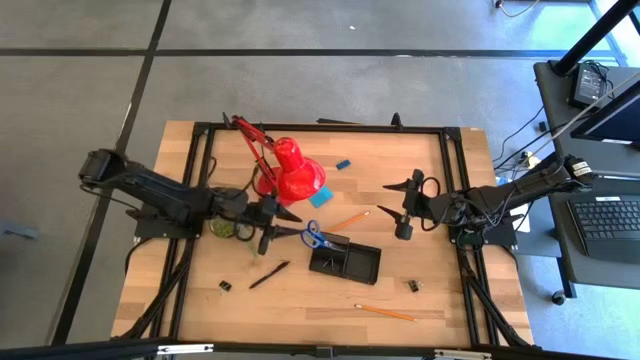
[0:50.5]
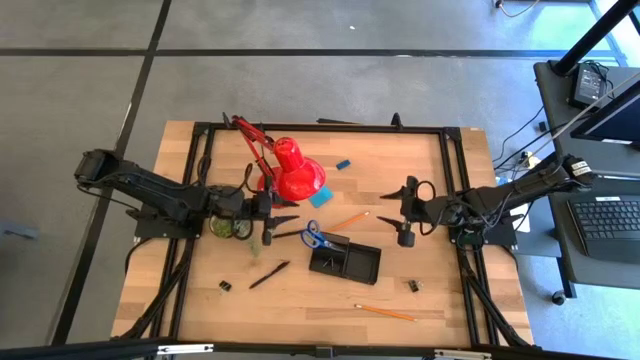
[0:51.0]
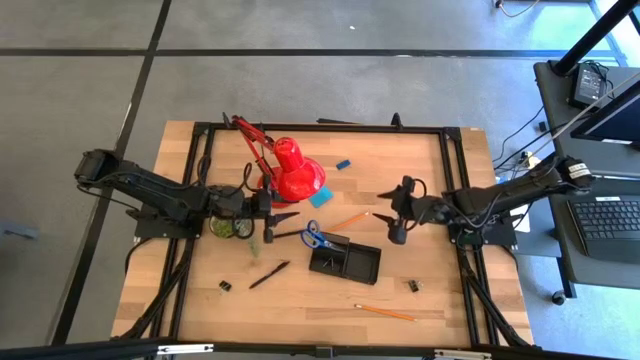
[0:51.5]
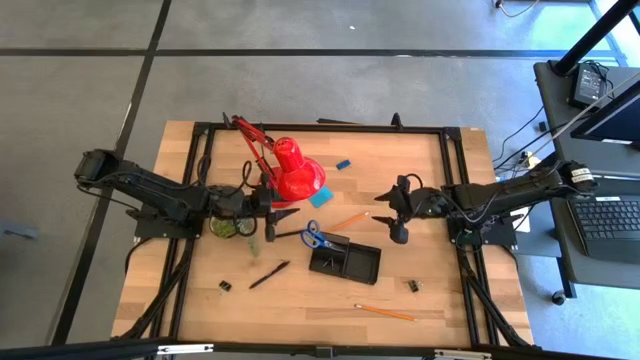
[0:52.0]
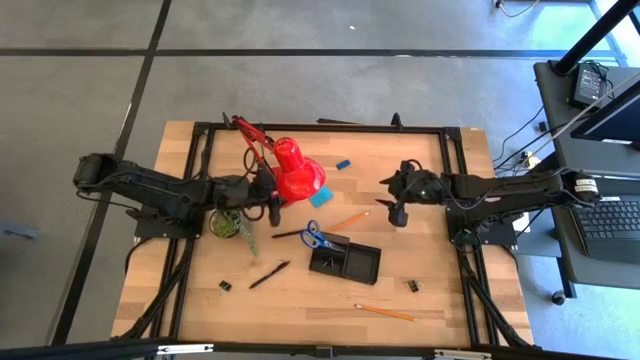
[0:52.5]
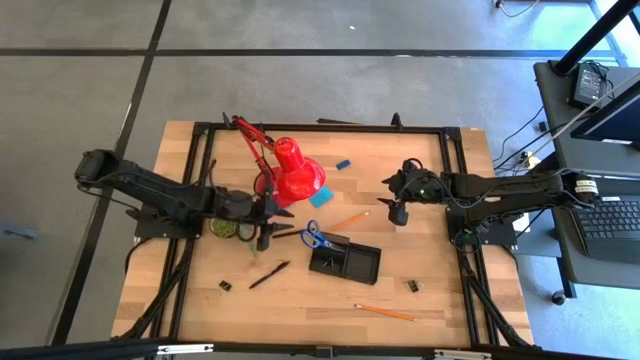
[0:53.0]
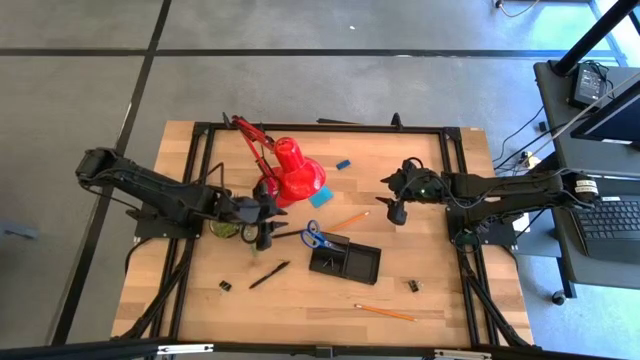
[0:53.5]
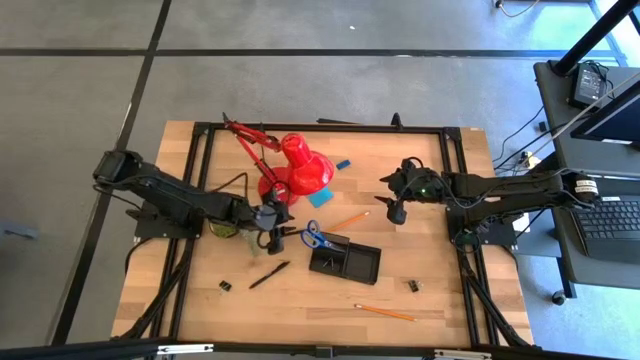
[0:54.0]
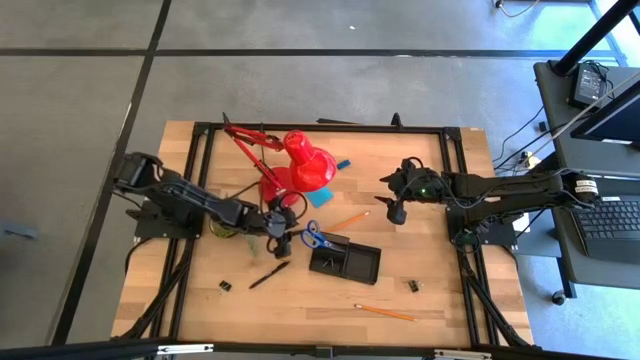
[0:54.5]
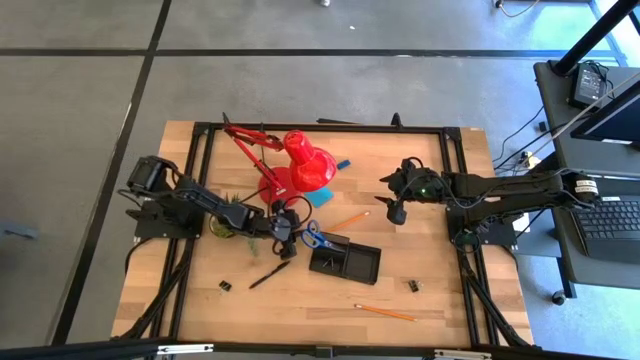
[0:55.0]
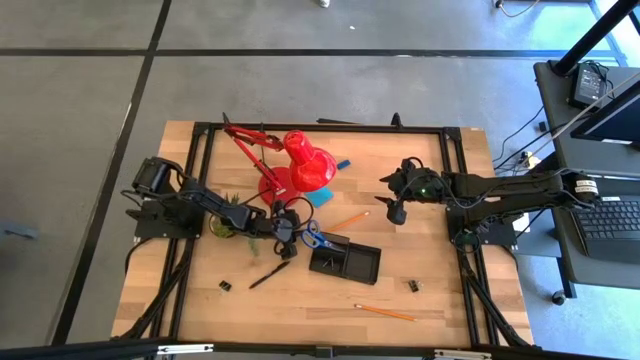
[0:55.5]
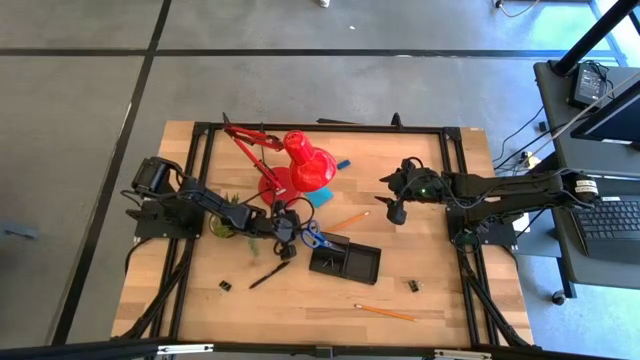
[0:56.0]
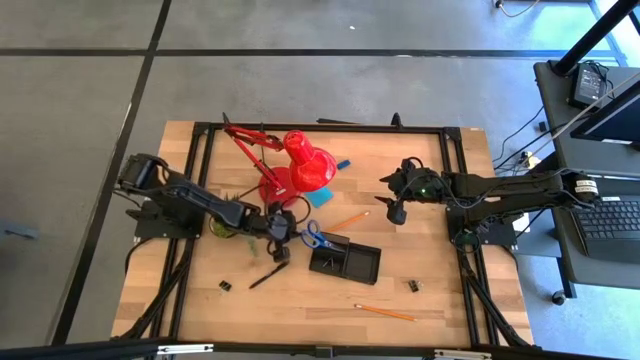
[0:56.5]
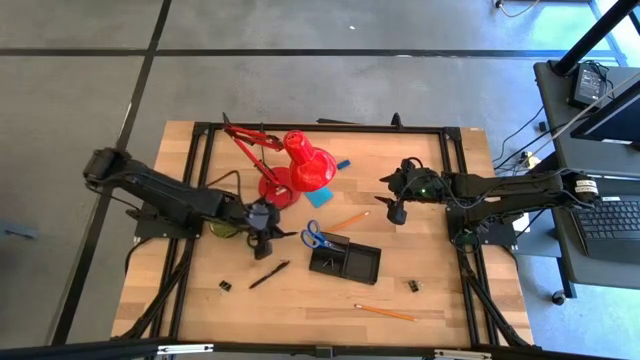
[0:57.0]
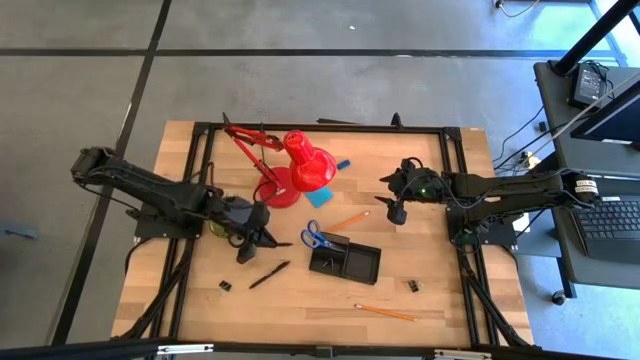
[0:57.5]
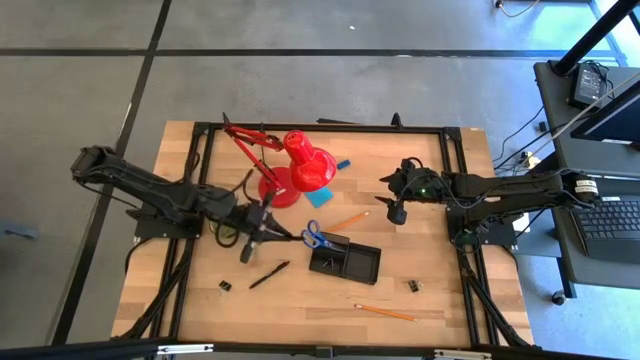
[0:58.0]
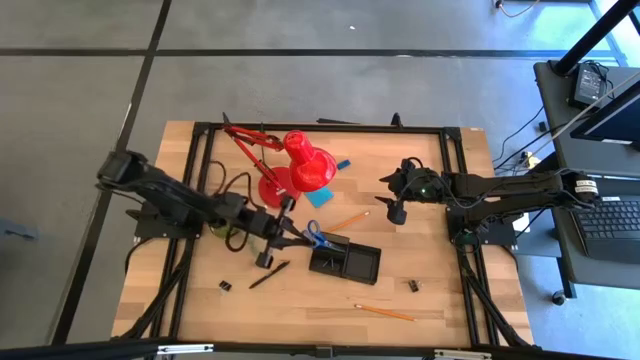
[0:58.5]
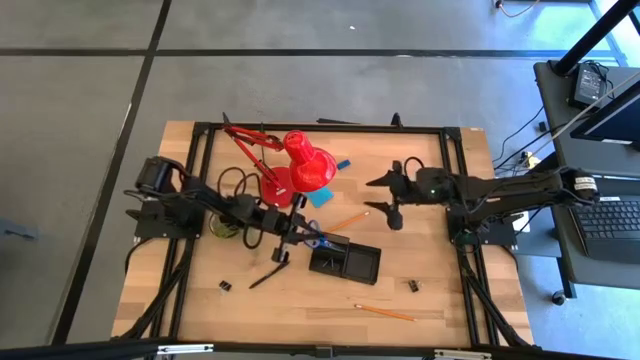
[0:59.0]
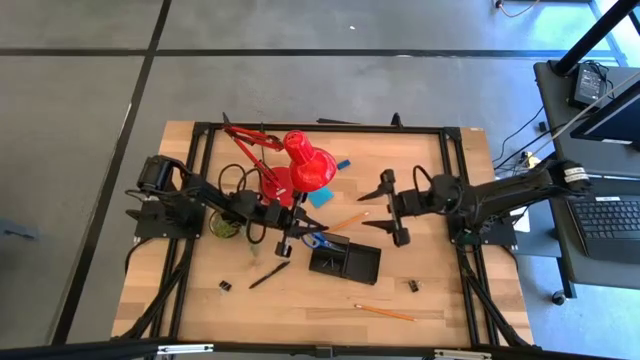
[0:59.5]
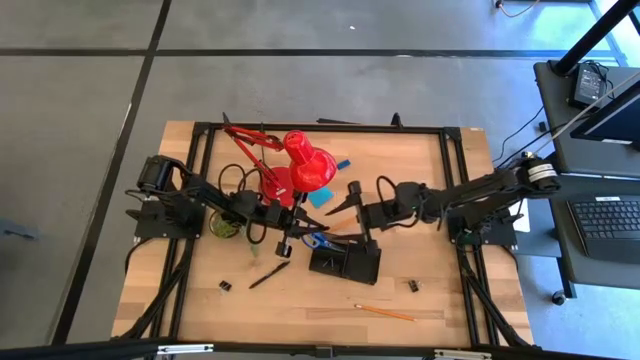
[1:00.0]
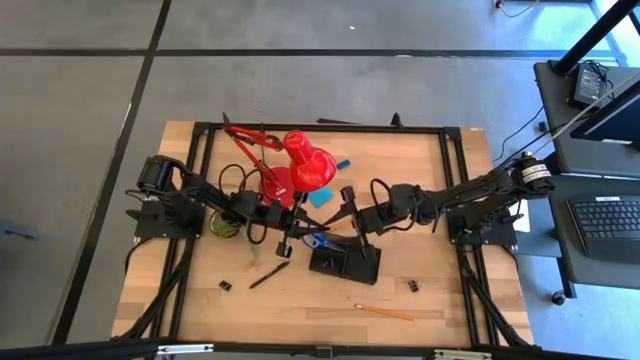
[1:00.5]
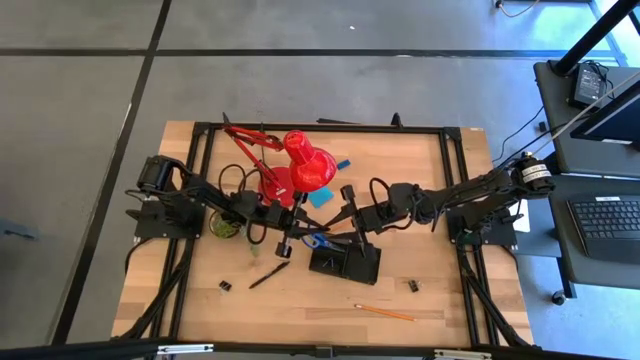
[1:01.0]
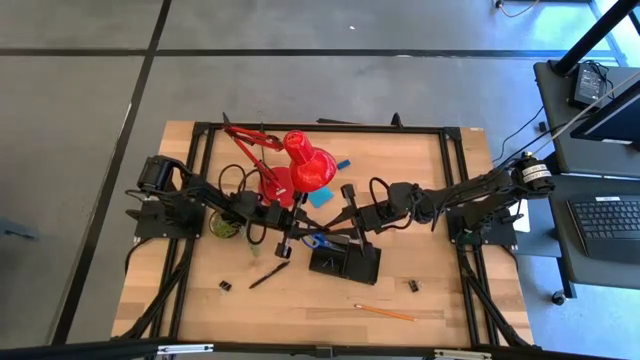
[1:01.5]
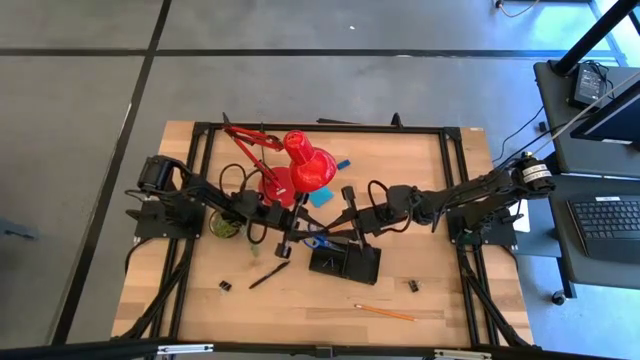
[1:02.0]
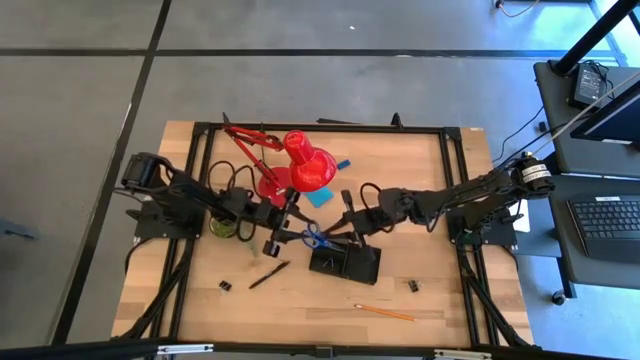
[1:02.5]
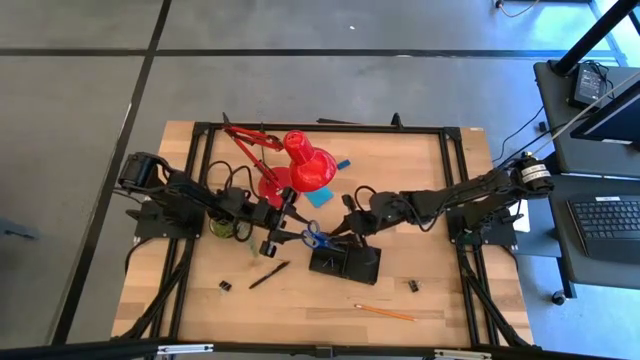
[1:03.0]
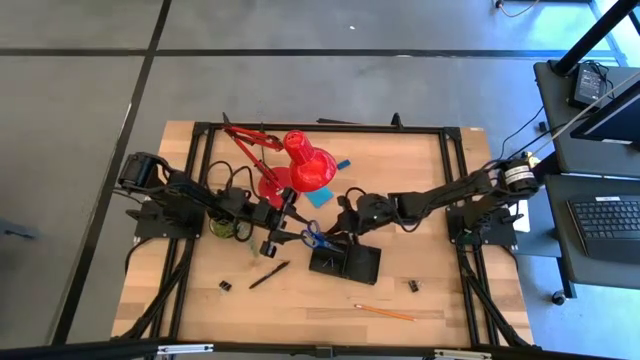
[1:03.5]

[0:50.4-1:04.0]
Task: Pick and place office supplies into organizer
Put the top black mechanical pen into the desk organizer

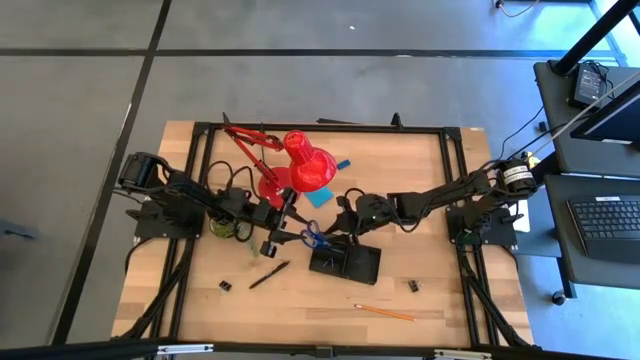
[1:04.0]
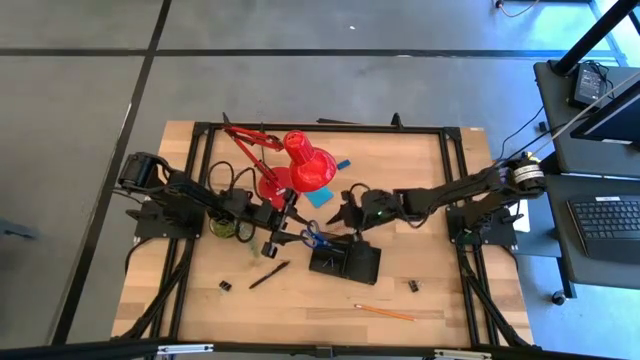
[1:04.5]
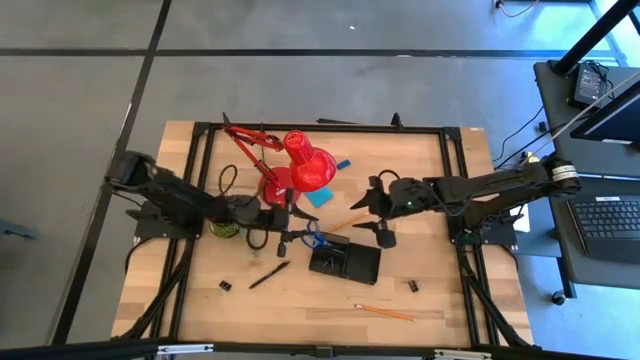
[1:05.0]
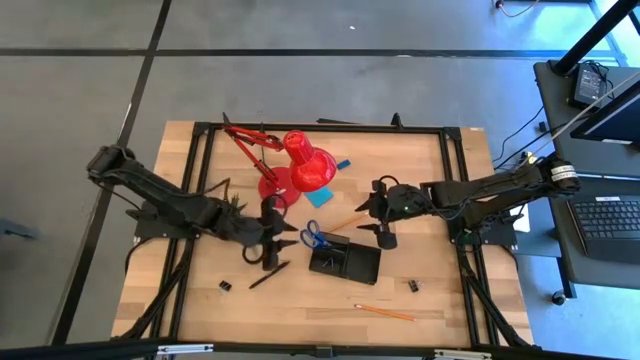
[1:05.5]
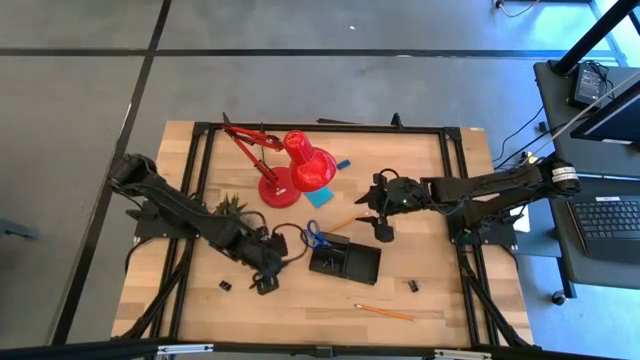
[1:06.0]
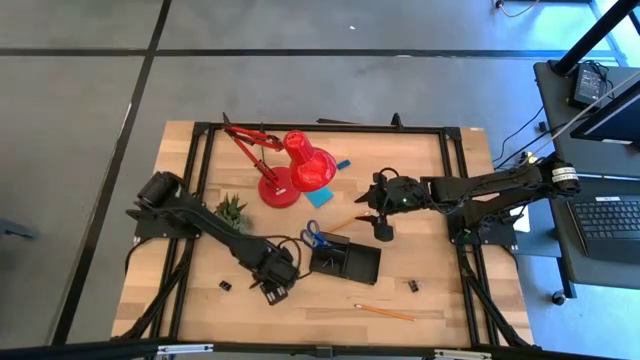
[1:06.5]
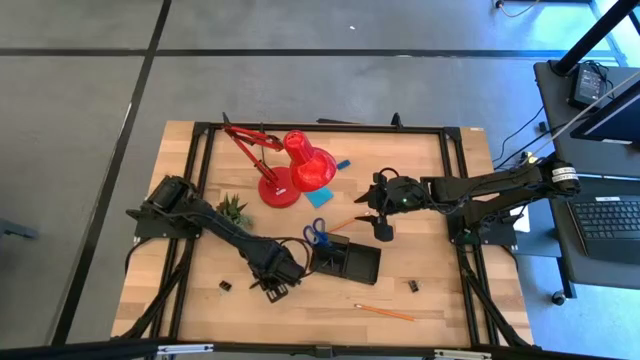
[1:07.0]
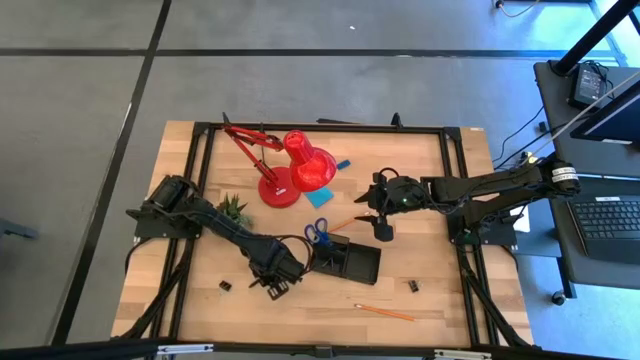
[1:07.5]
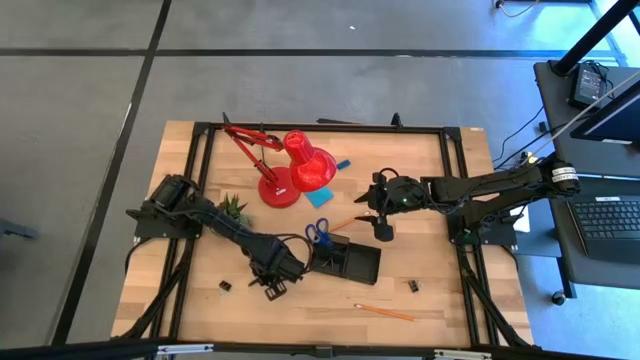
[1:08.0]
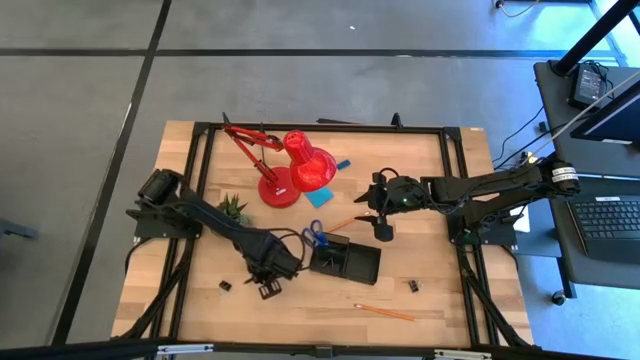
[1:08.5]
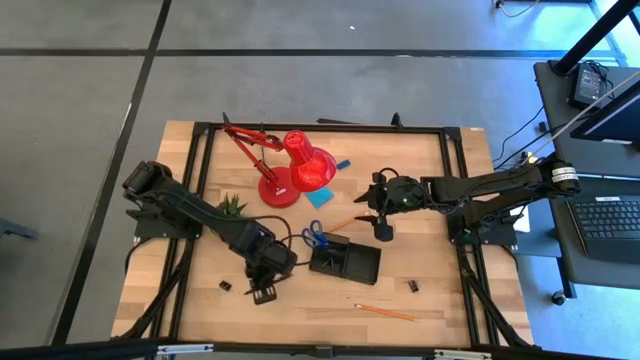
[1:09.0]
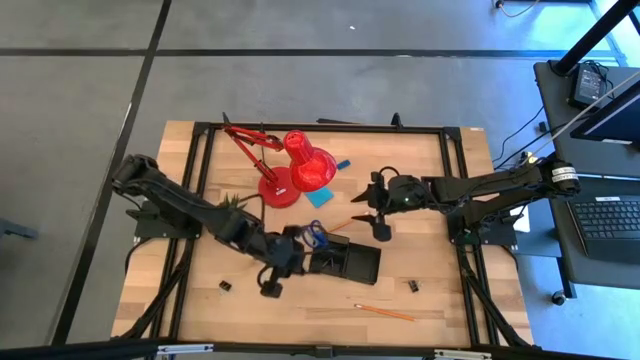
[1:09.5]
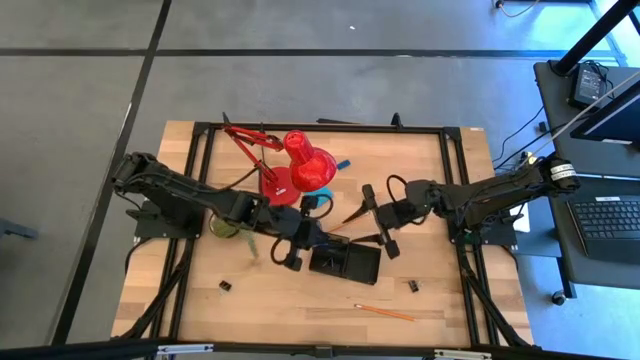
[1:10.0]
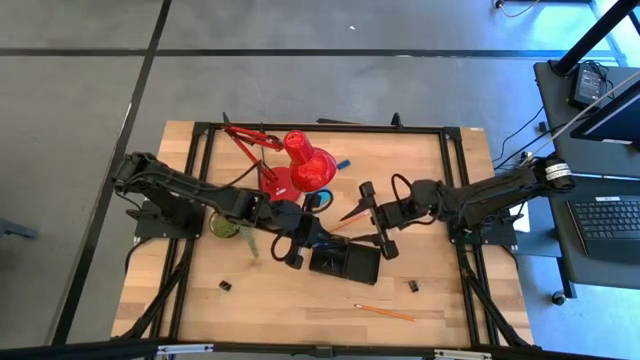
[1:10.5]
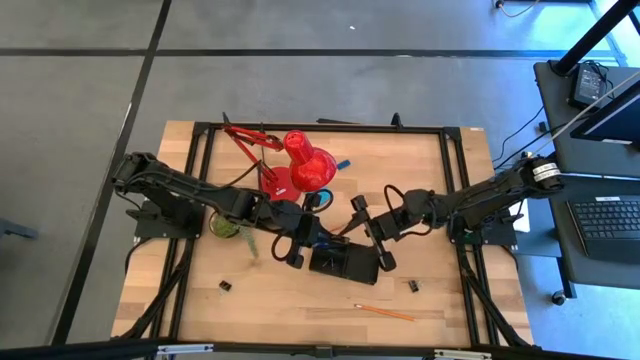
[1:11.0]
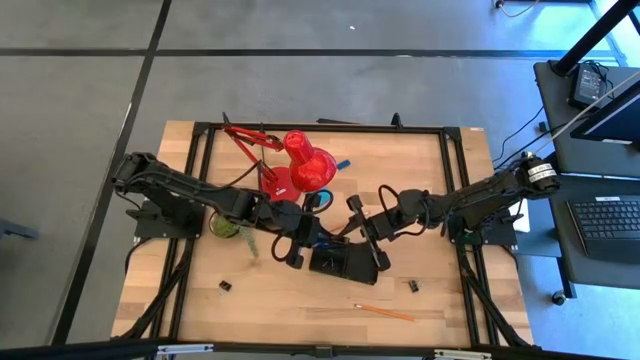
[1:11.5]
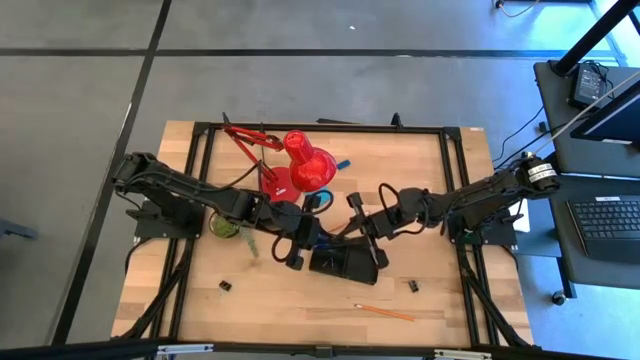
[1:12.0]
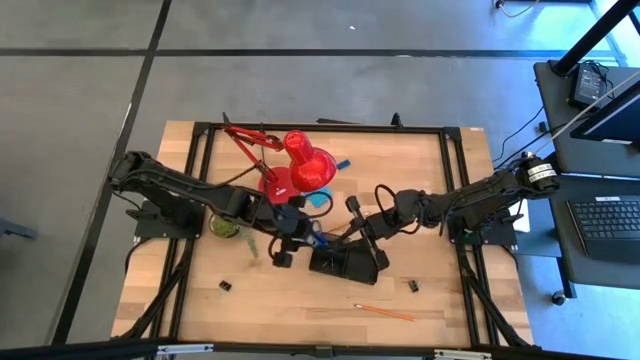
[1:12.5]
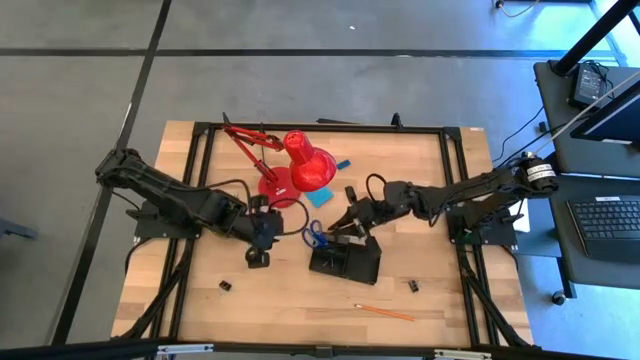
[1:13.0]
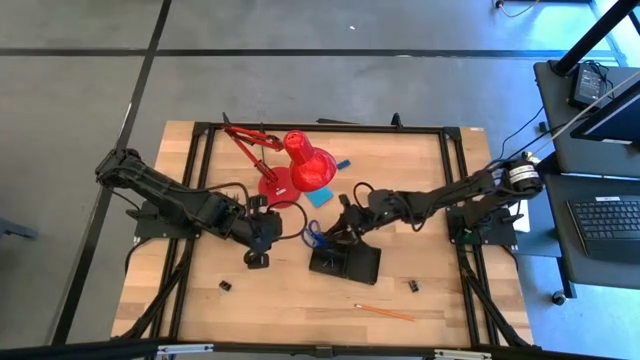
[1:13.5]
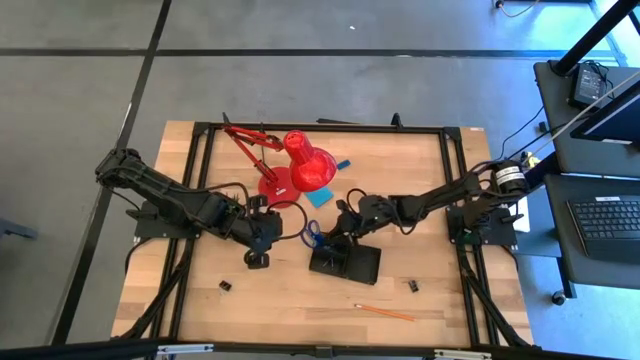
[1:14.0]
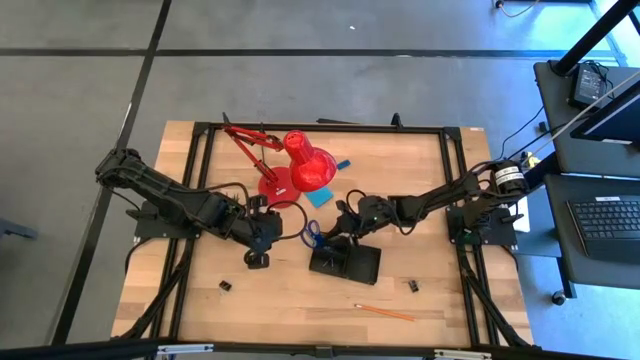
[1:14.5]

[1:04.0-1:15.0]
Put the black mechanical pen into the desk organizer
